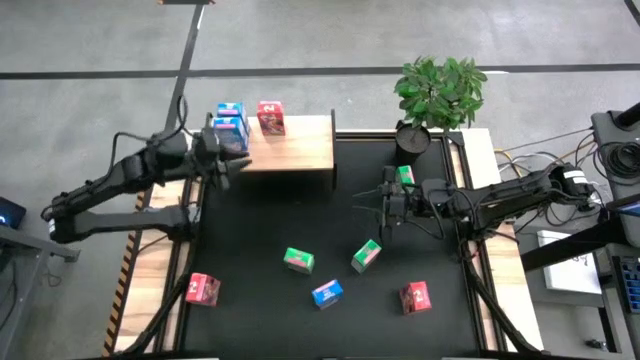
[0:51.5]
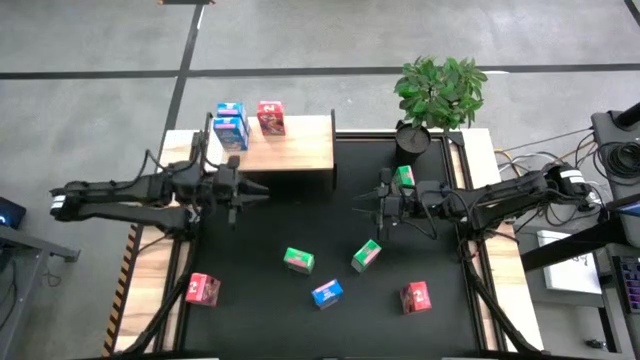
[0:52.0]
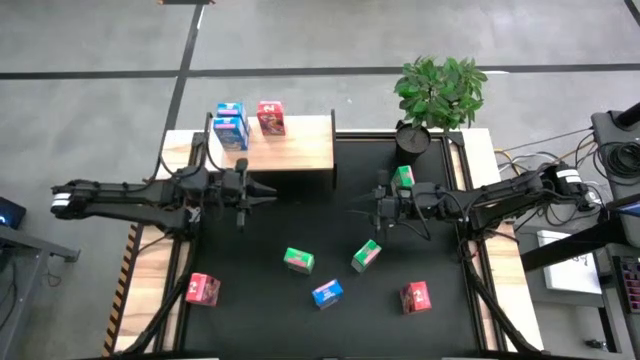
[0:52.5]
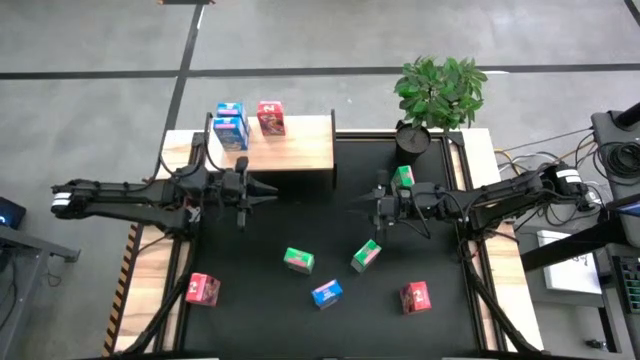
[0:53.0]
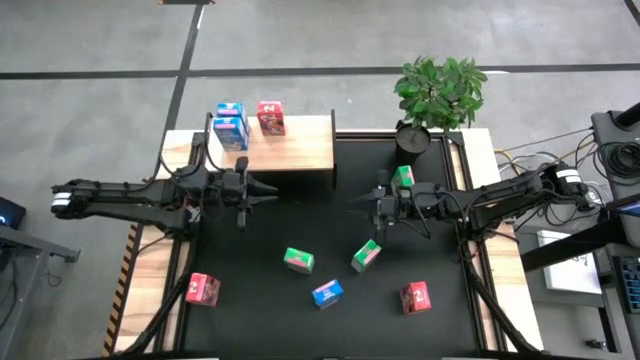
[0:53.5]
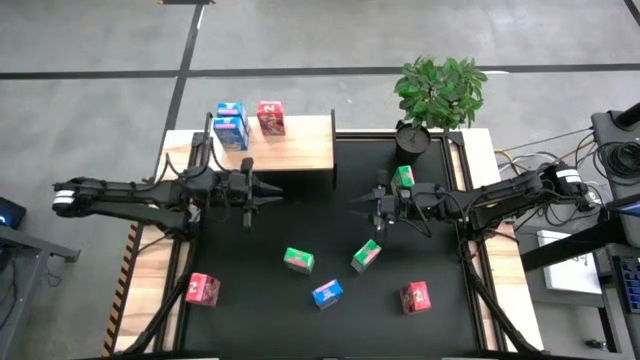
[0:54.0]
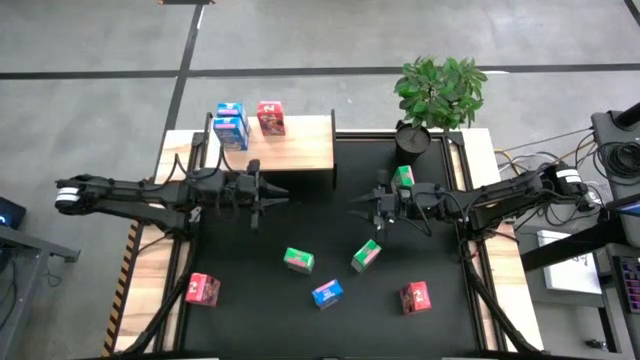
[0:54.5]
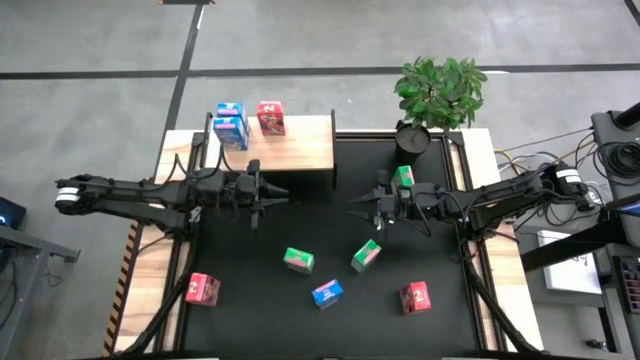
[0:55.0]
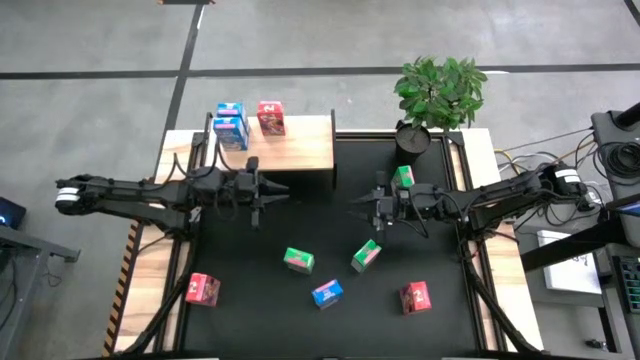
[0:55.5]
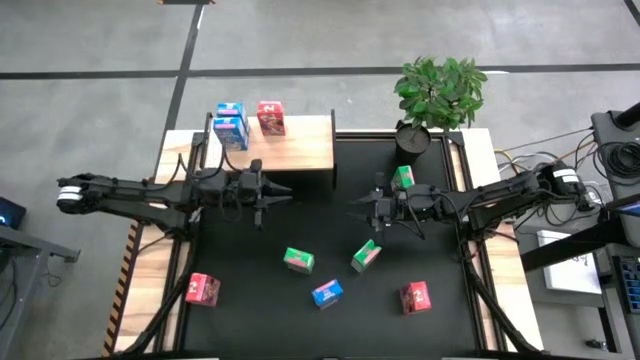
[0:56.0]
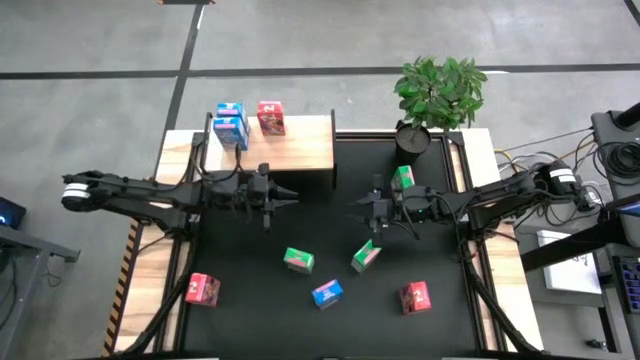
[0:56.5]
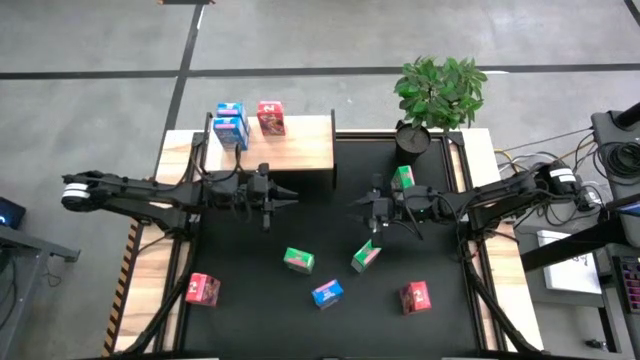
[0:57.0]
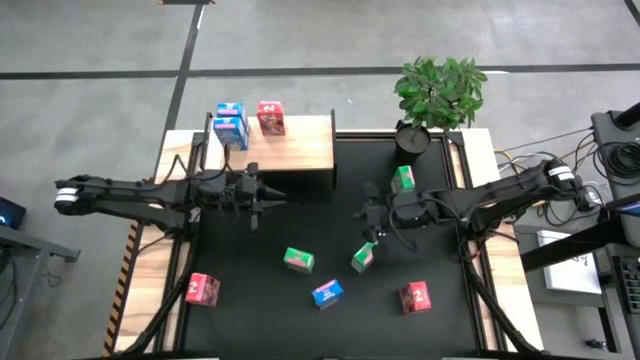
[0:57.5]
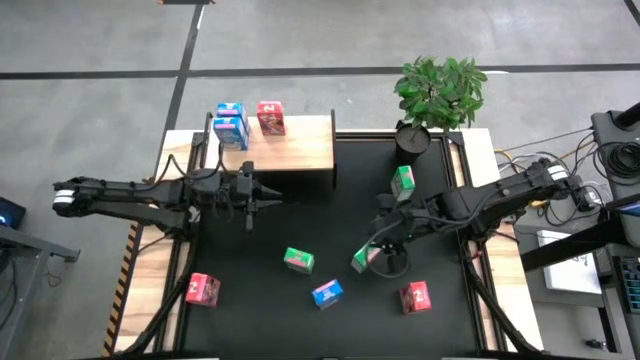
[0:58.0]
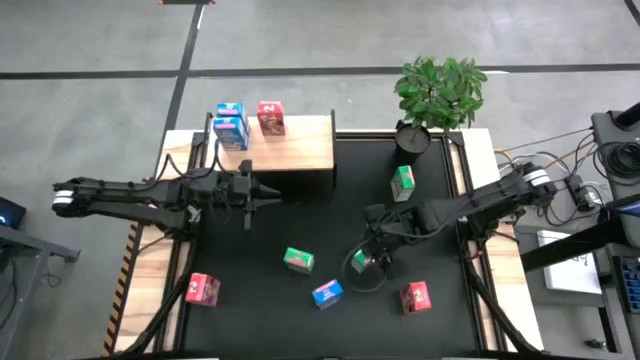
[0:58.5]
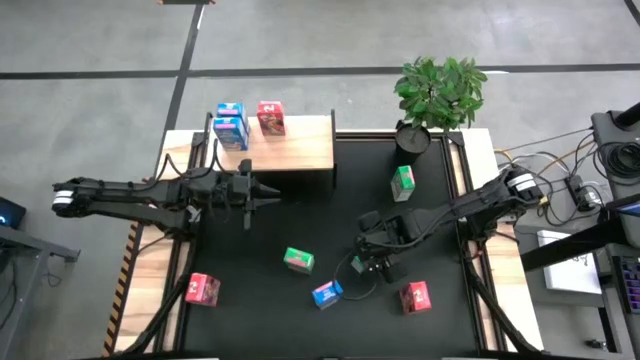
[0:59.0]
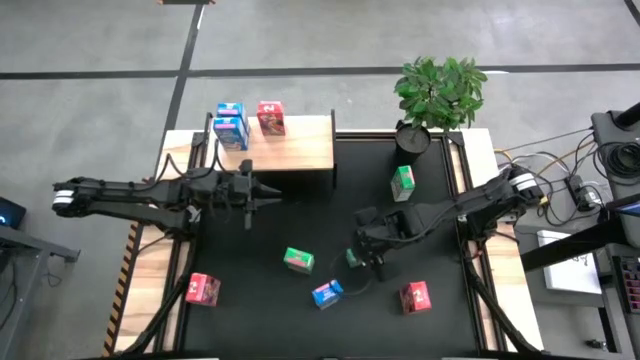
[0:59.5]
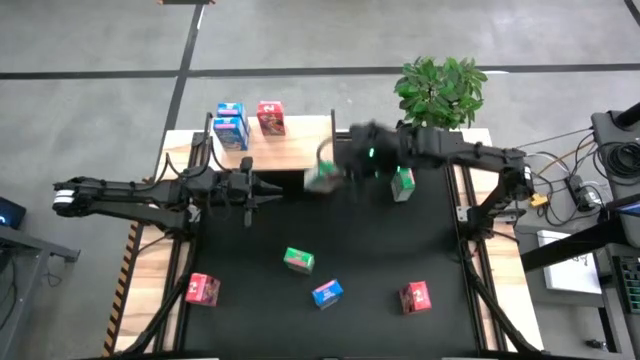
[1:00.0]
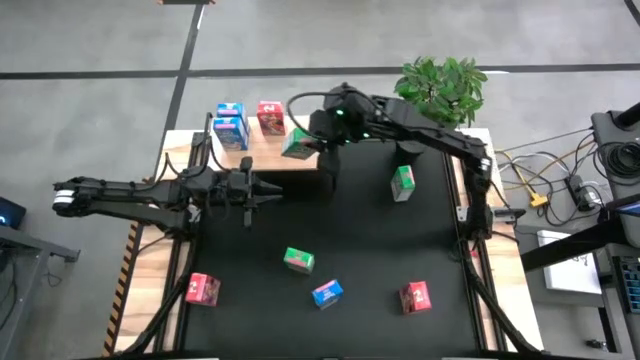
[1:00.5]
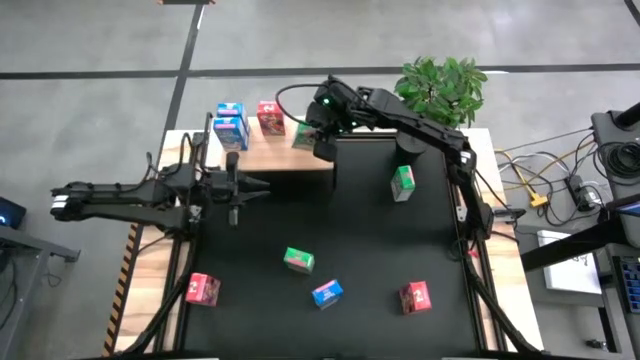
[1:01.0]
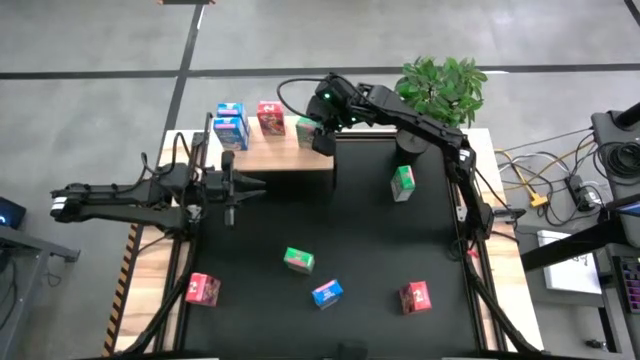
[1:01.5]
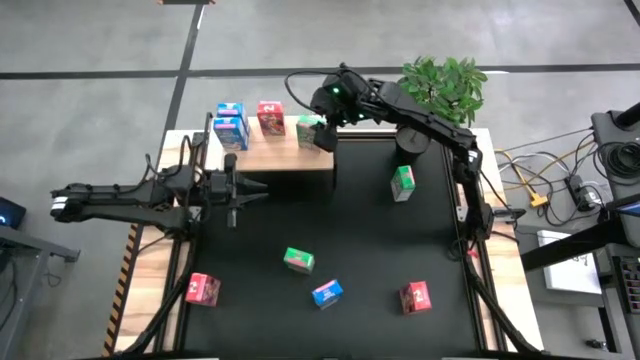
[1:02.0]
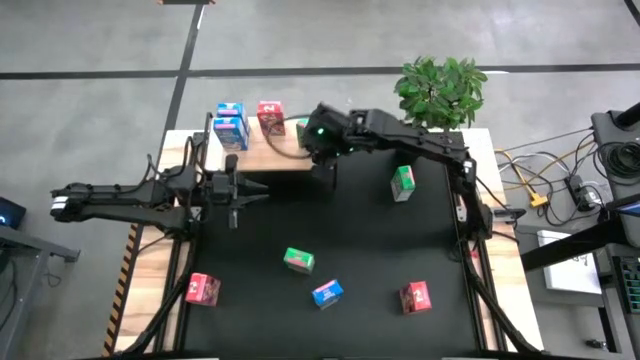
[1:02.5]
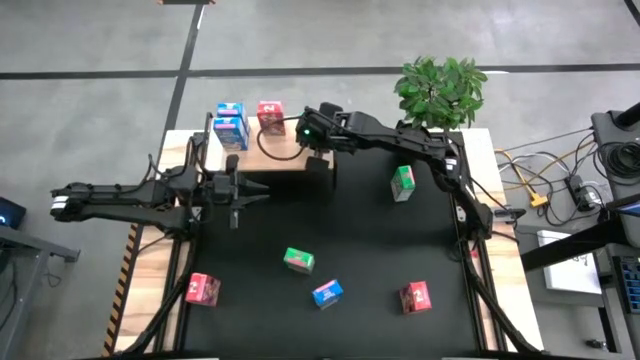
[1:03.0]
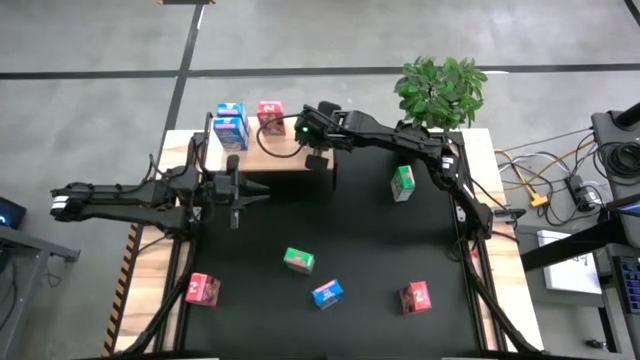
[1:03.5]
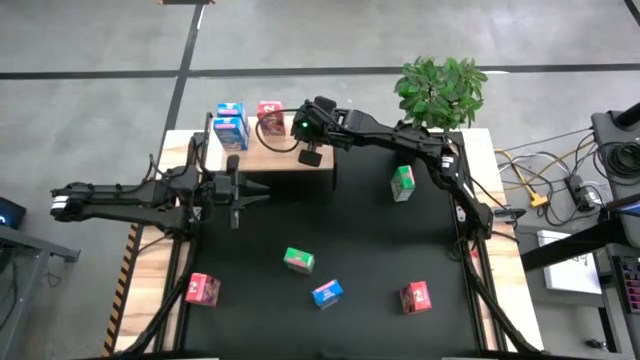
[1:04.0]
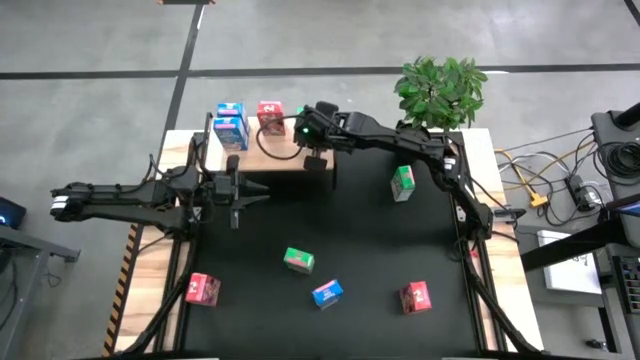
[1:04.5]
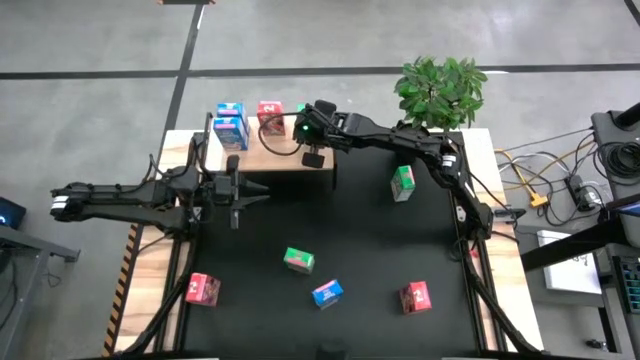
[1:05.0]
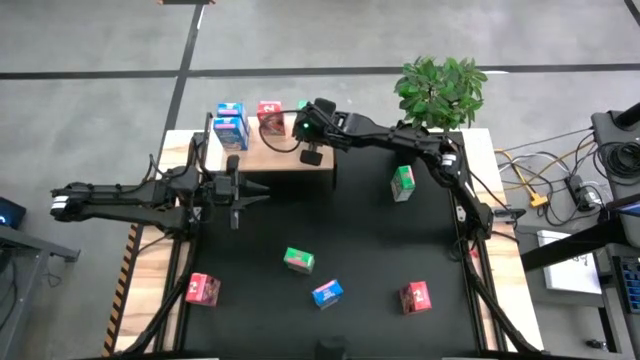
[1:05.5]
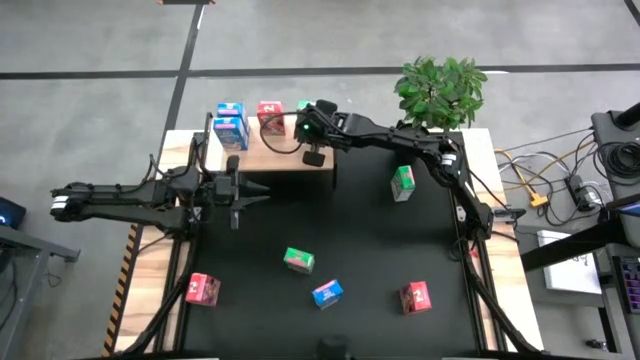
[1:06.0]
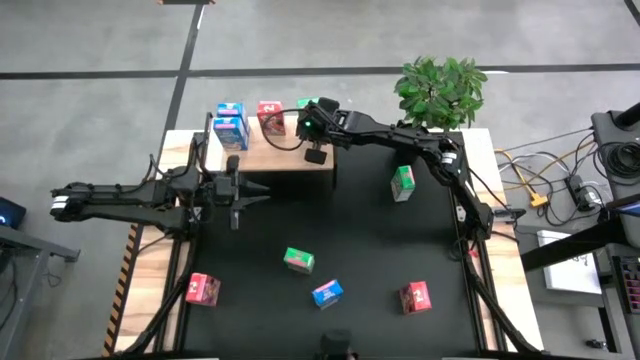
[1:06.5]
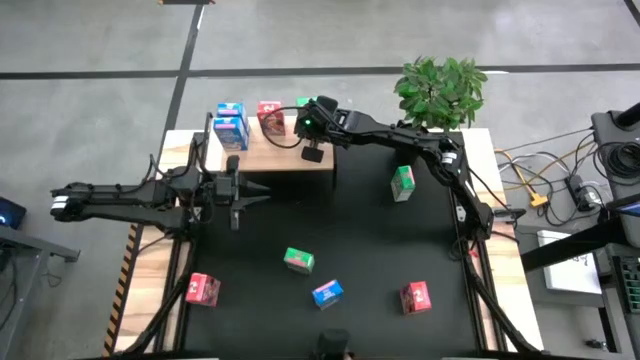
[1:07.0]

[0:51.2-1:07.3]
Task: Stack cereal on shelf
Put the bottom right green cereal box on the shelf
